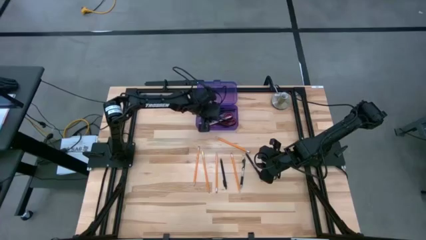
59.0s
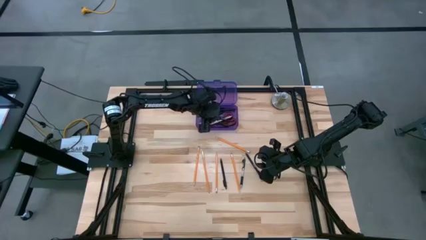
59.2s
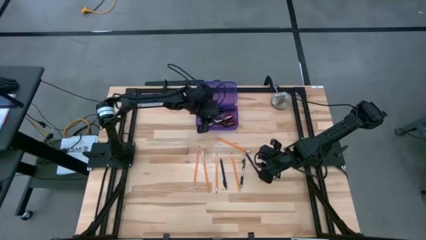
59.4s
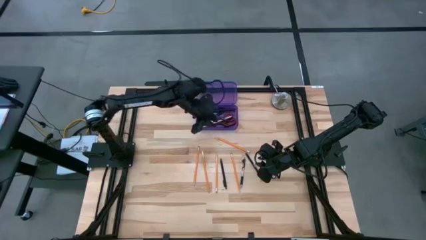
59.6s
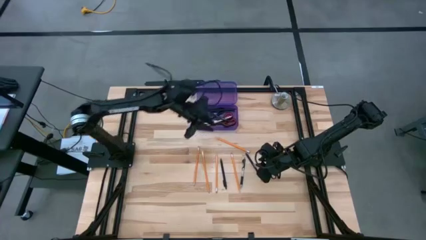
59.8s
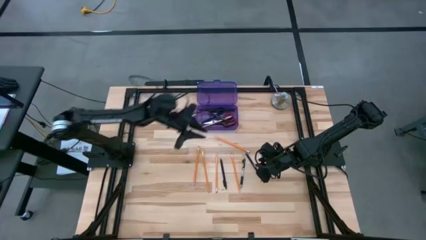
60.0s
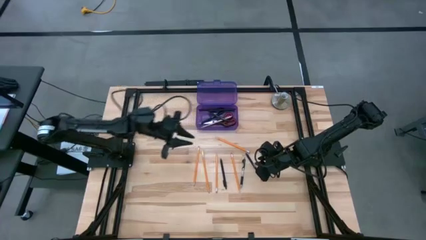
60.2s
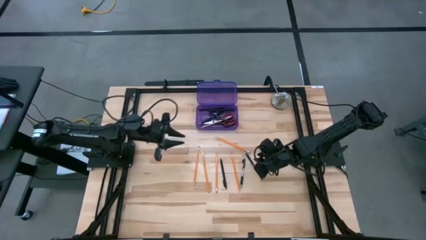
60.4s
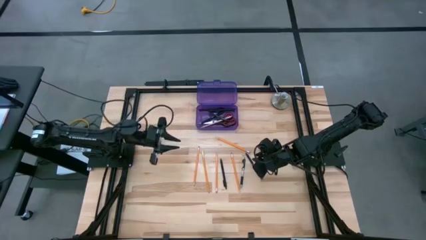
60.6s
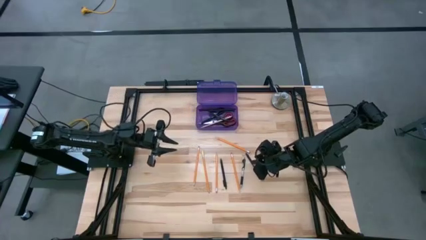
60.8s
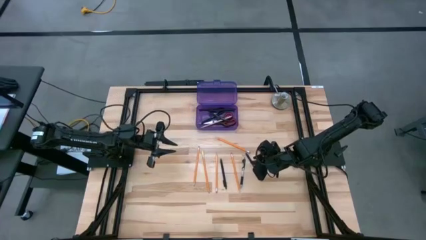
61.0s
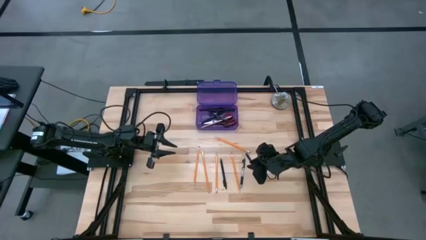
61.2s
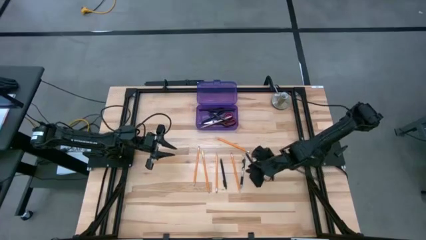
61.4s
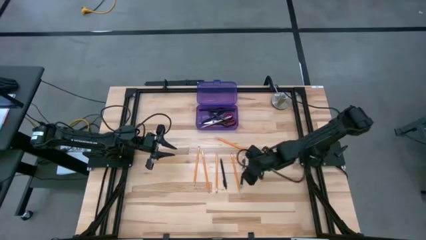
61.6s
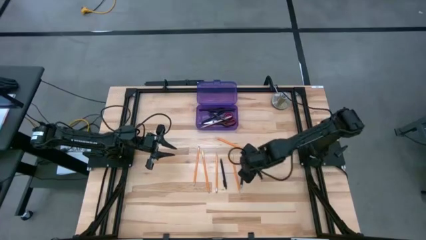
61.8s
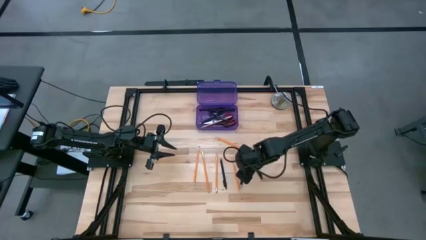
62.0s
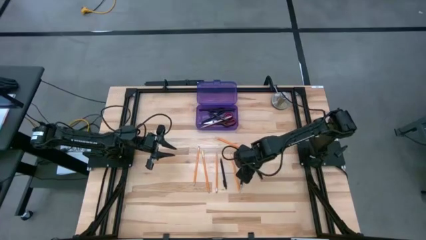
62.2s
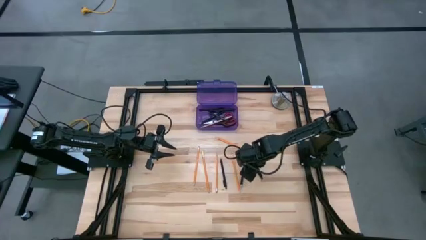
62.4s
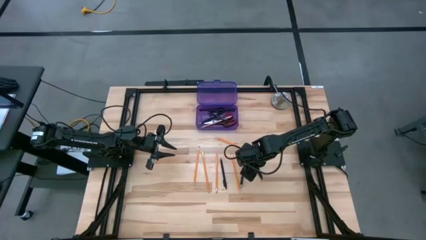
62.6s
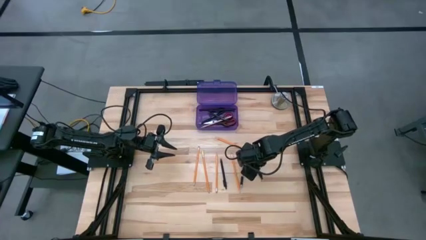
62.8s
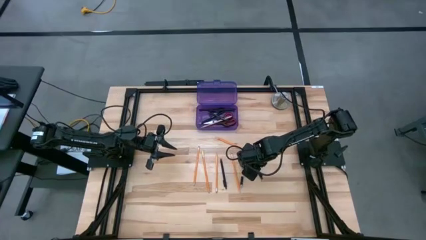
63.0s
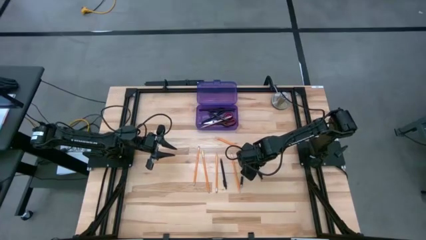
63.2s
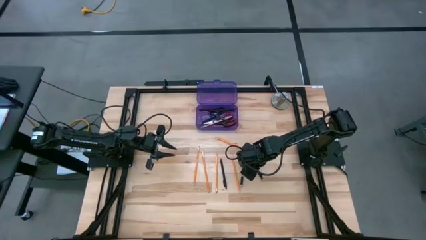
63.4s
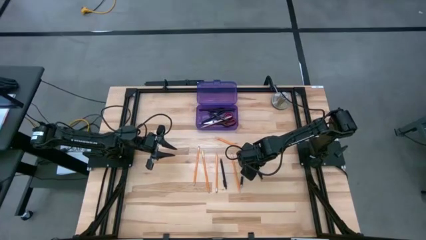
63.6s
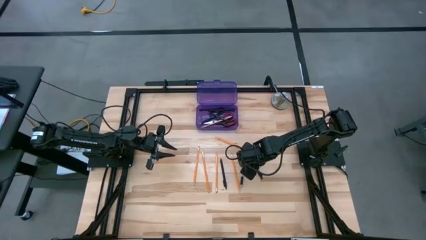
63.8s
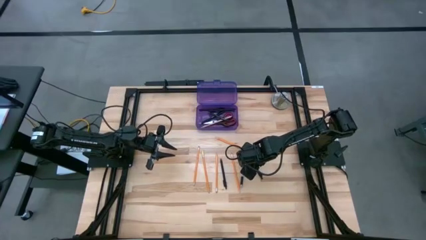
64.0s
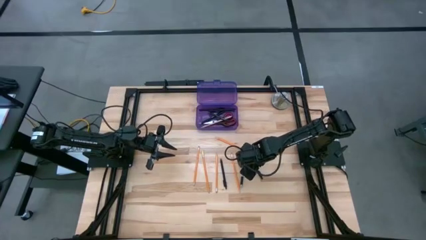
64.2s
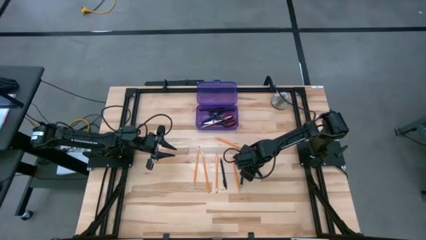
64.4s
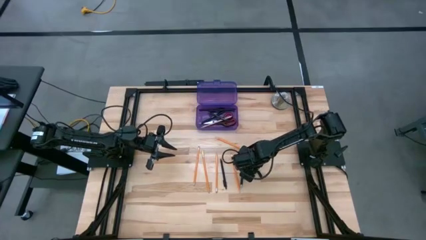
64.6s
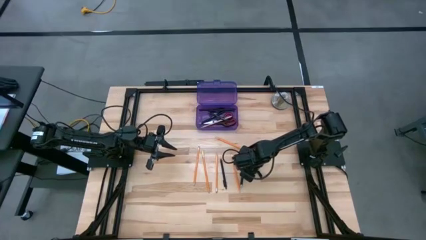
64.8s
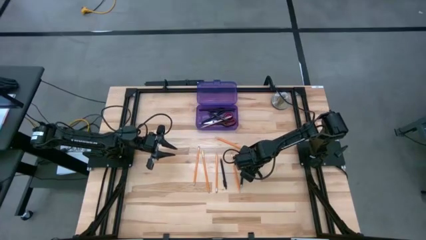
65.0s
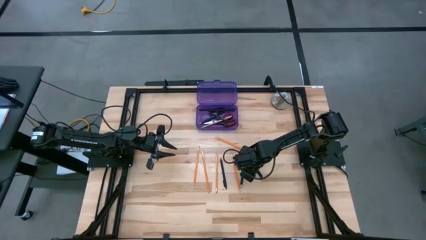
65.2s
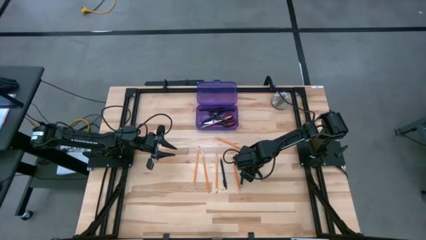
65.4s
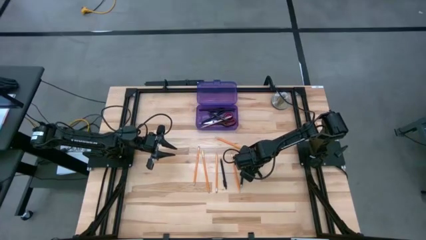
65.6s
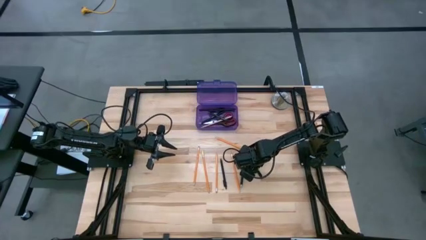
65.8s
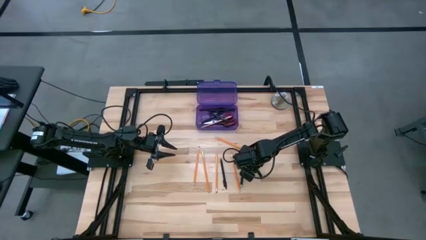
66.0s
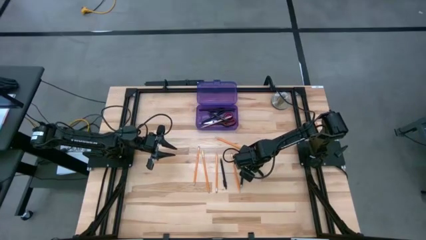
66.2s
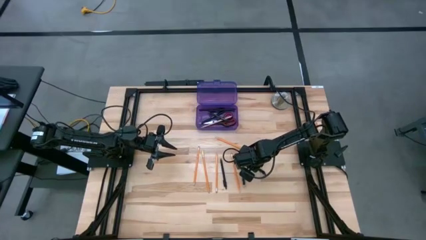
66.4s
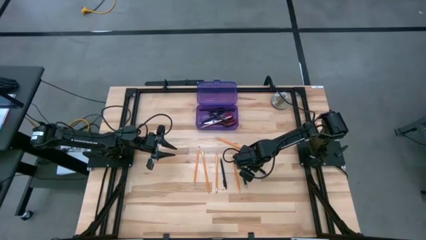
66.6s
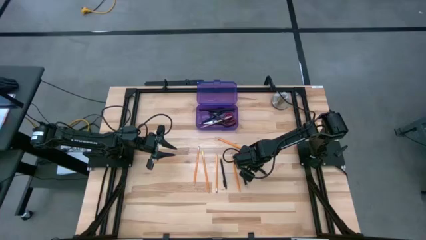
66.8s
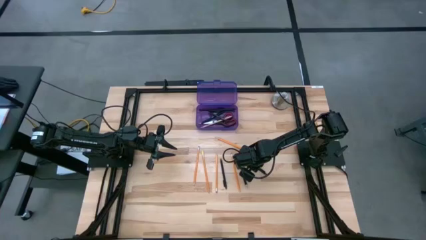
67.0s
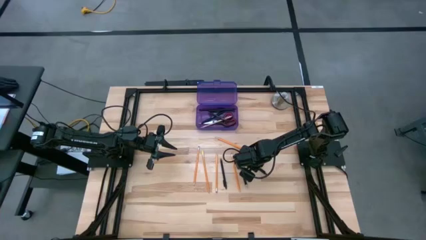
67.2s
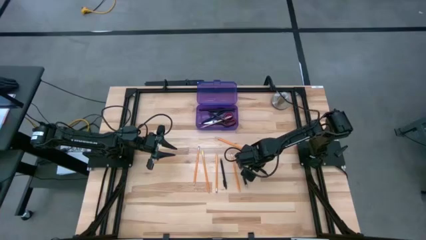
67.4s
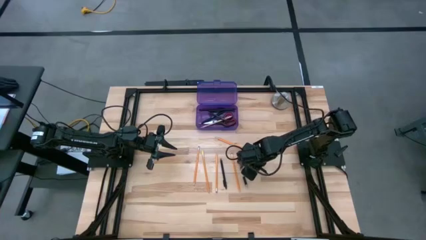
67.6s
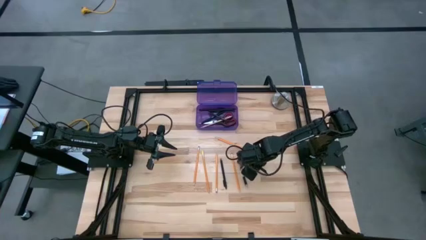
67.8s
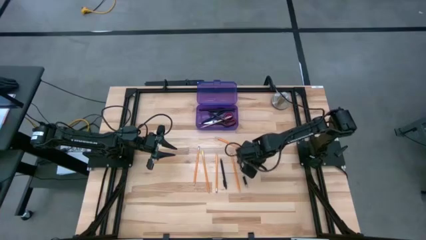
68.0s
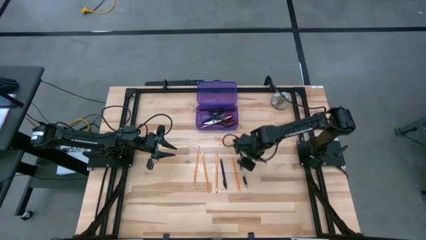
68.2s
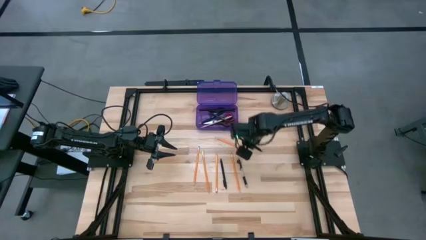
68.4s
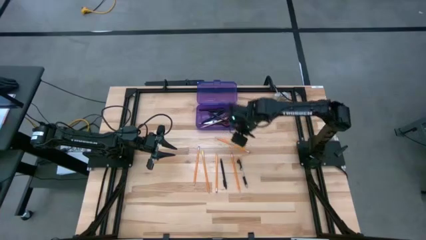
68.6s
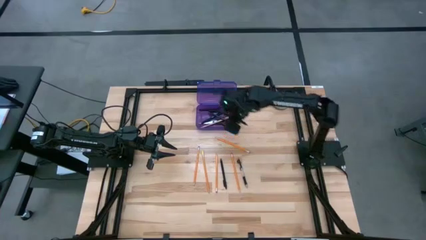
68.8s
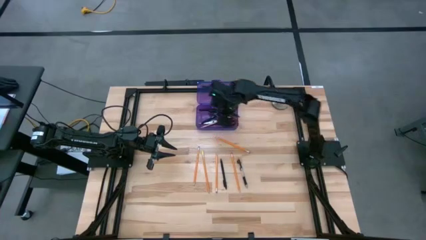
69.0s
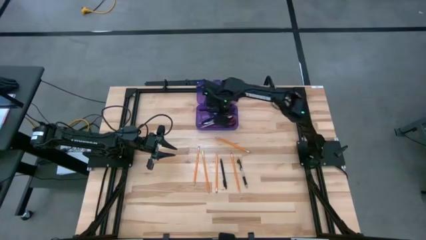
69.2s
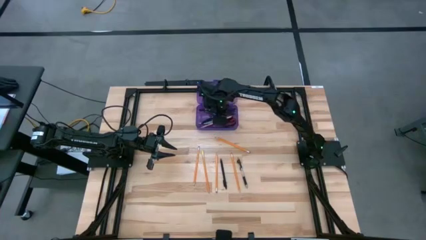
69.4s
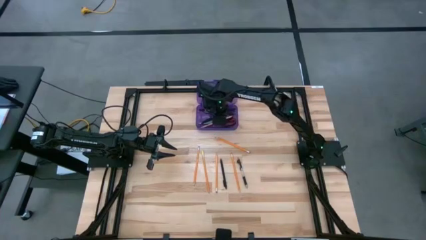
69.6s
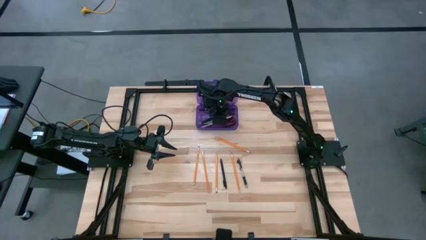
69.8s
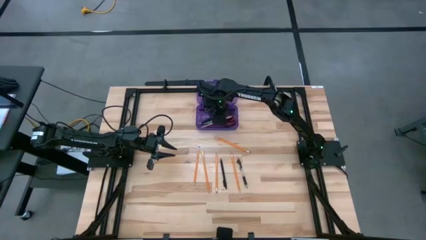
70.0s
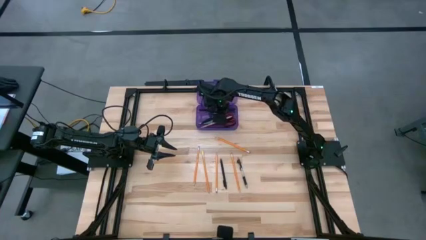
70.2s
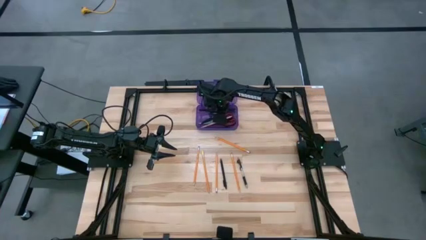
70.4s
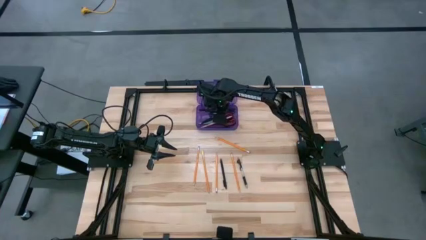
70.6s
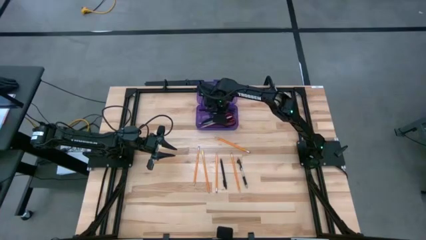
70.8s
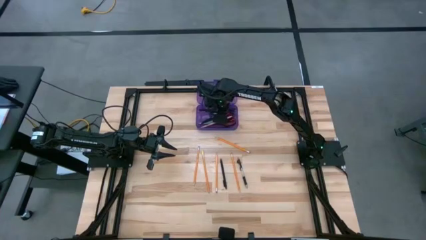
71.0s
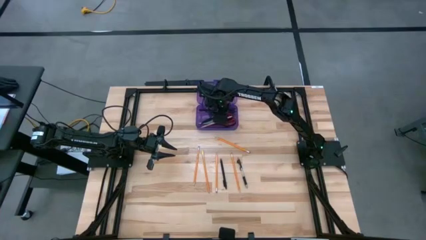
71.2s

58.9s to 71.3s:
Task: Pick & place school supplies into a supply box
Put the black pen into the violet supply box

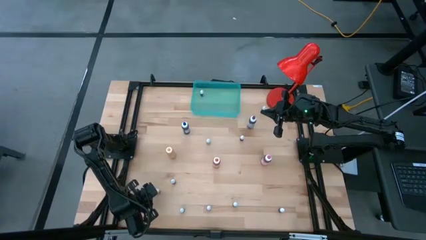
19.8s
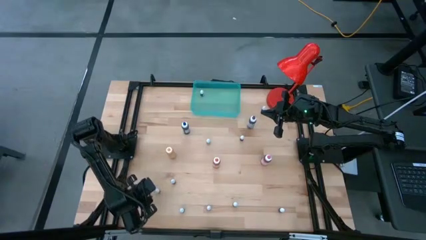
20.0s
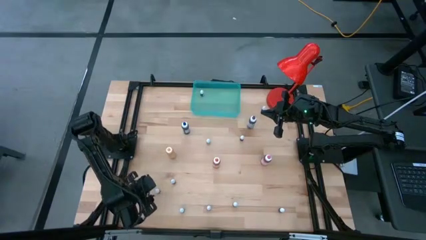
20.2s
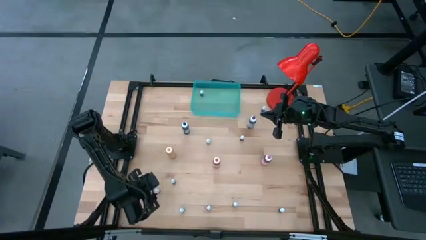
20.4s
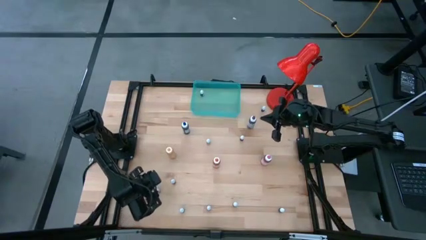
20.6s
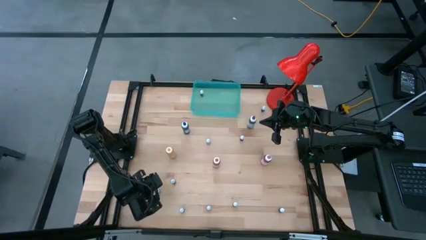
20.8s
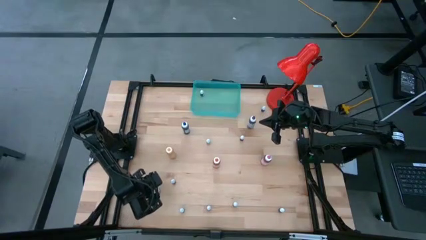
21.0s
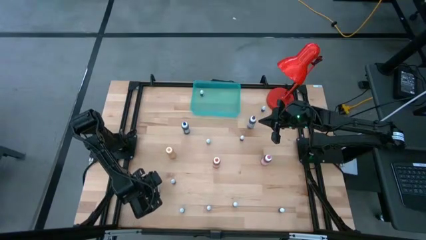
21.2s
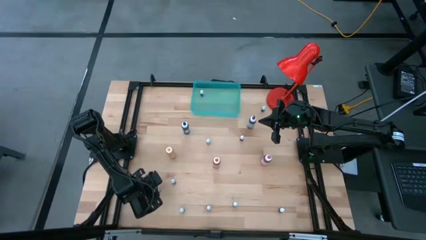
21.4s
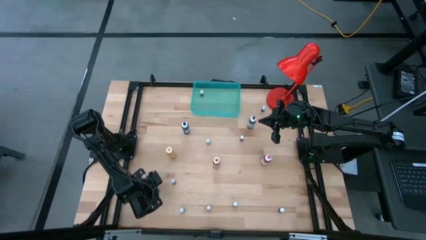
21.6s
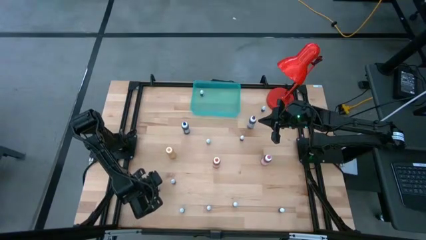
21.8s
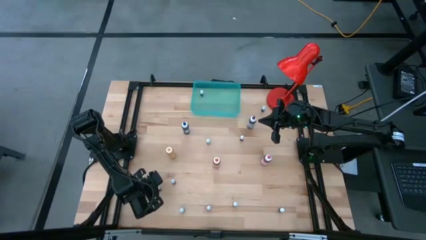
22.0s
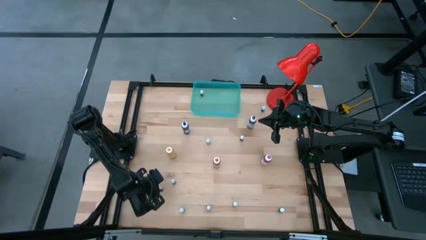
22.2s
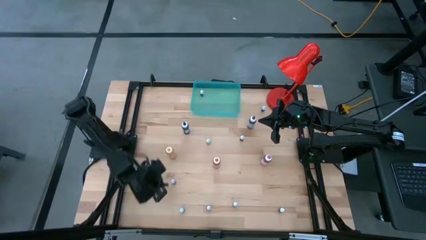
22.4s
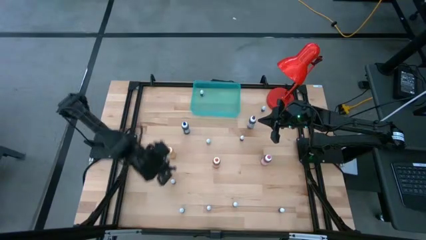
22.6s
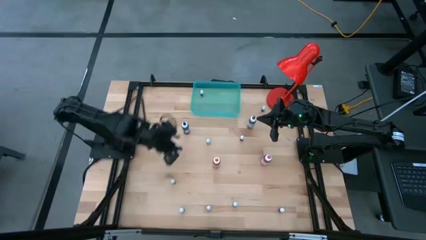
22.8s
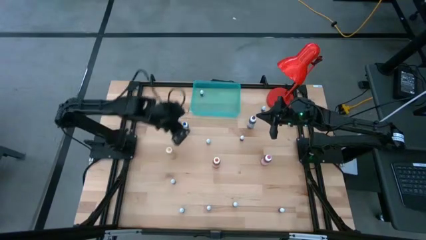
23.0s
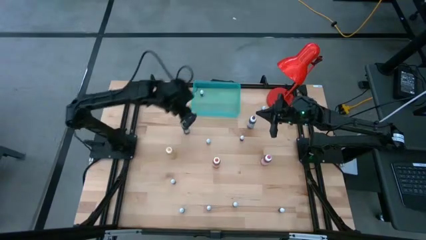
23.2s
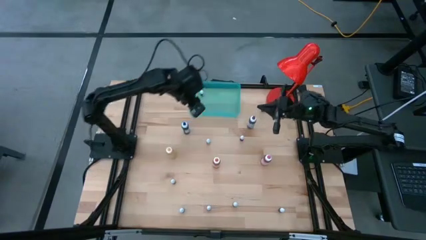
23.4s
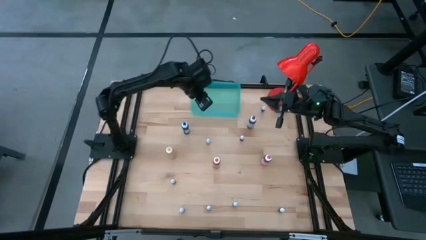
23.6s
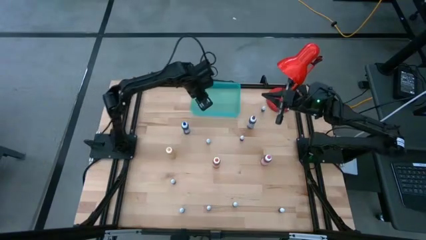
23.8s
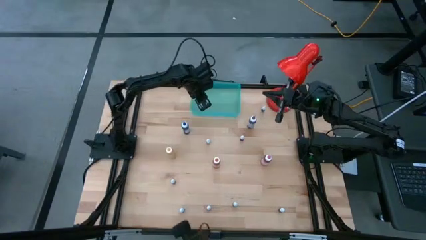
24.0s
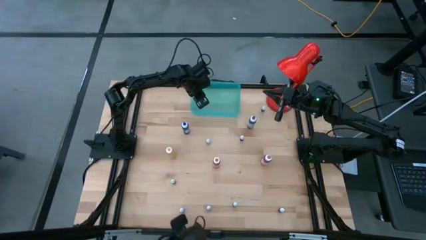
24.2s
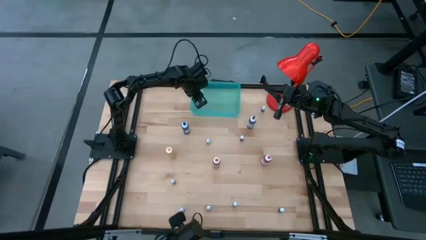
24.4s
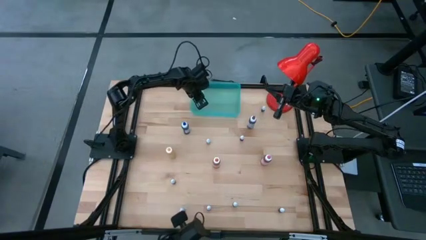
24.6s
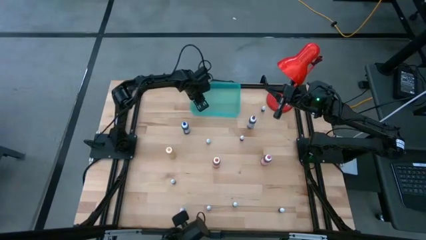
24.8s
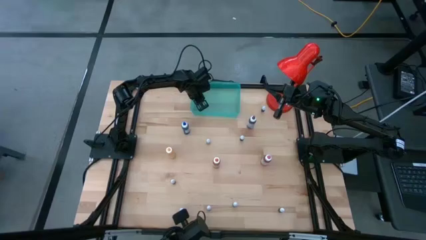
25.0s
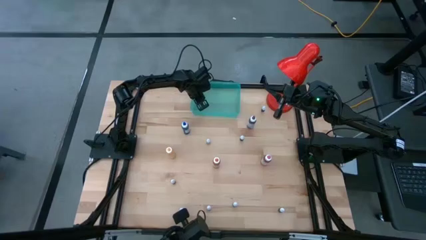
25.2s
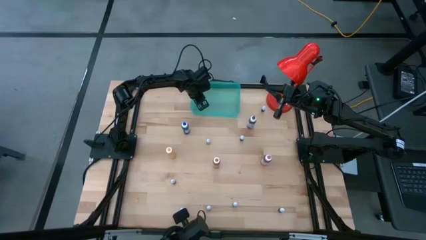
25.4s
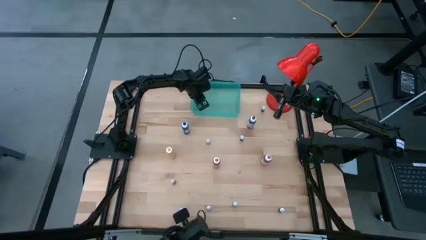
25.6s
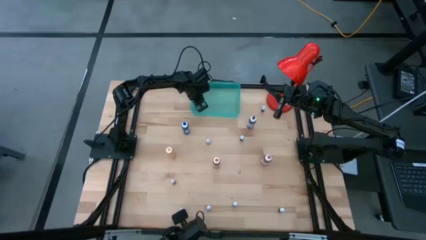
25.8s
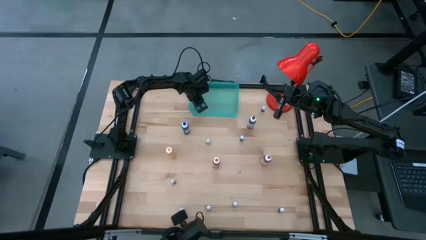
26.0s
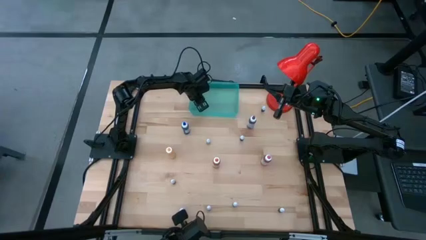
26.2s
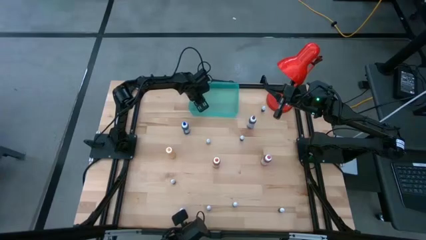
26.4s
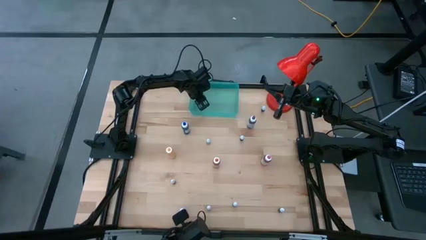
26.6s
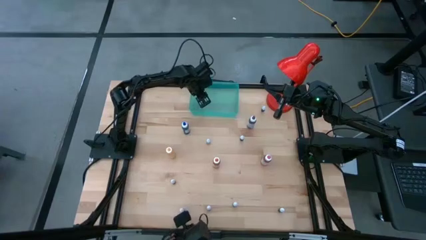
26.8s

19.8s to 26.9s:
Task: Pick & Place food coloring
Put the bottom left black food coloring bottle into the bin
